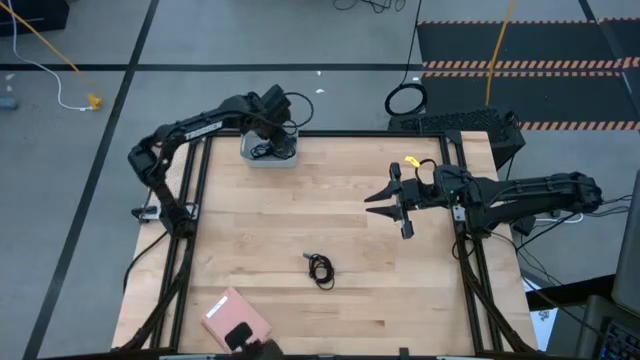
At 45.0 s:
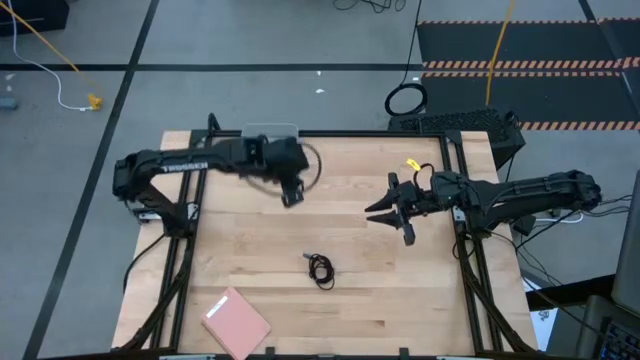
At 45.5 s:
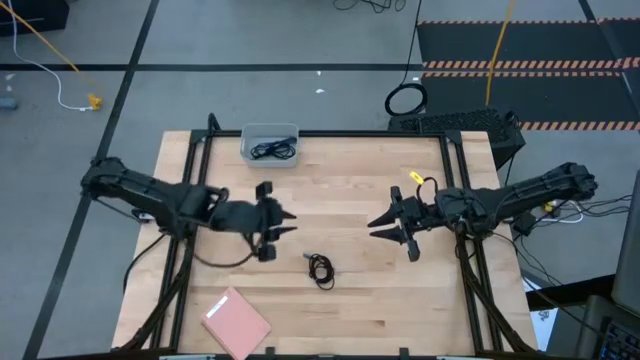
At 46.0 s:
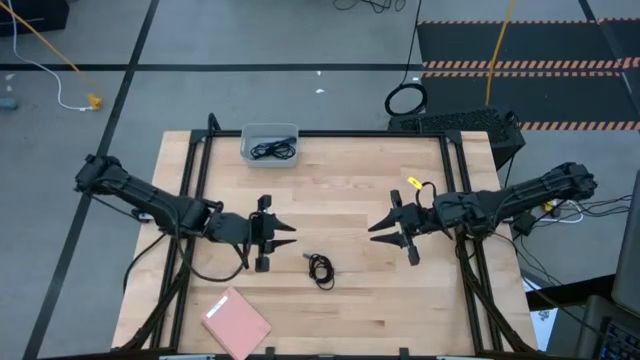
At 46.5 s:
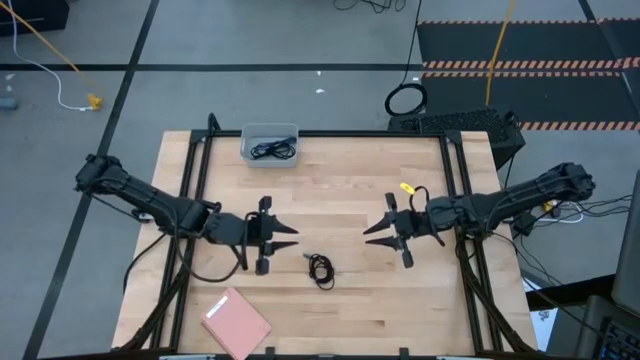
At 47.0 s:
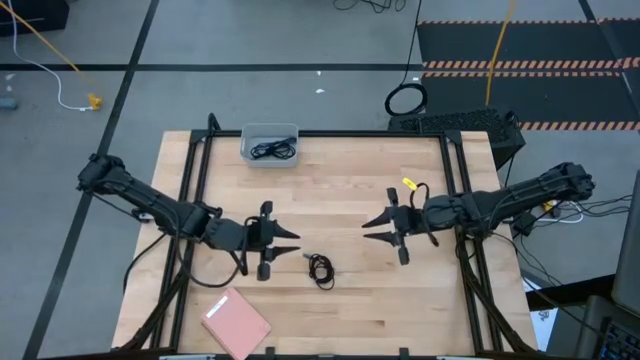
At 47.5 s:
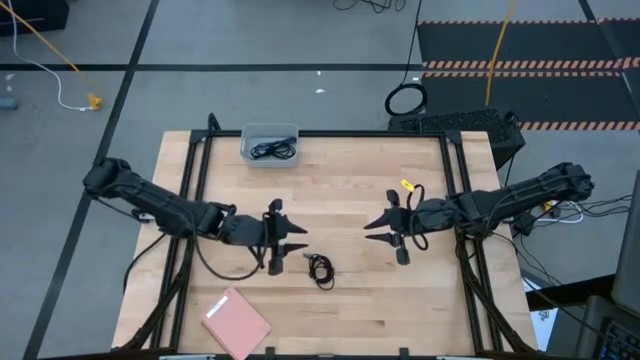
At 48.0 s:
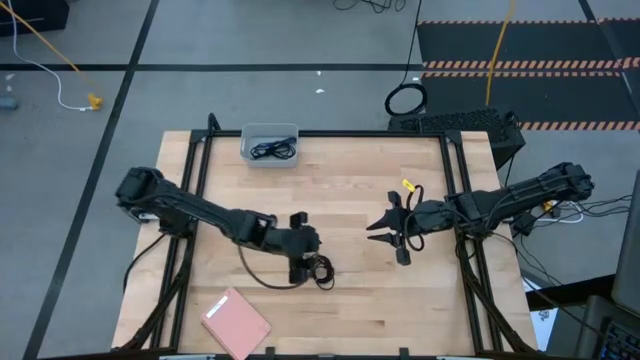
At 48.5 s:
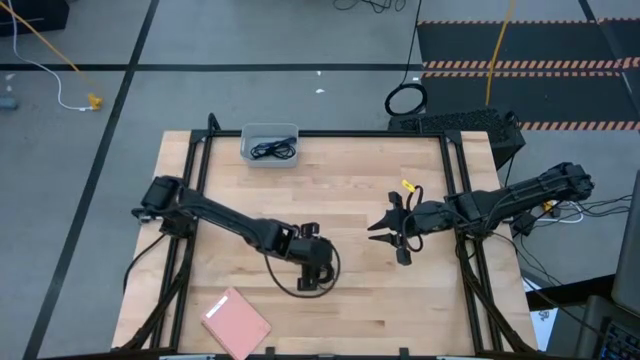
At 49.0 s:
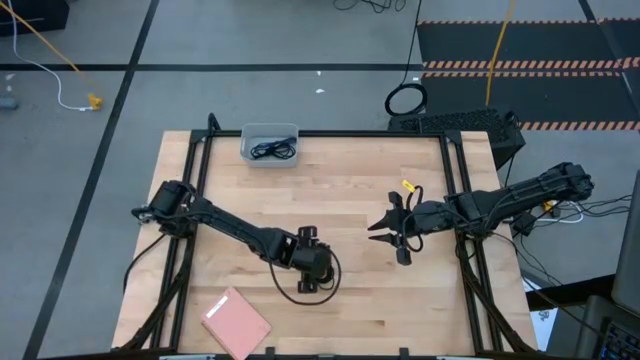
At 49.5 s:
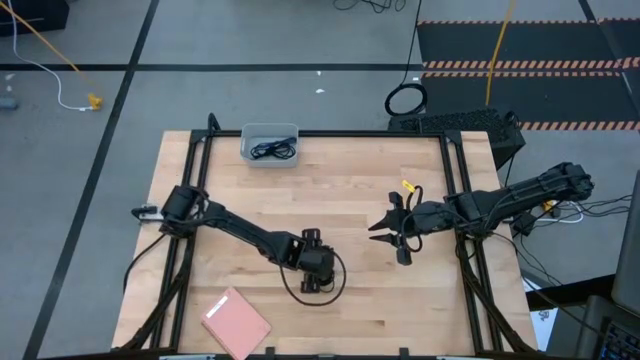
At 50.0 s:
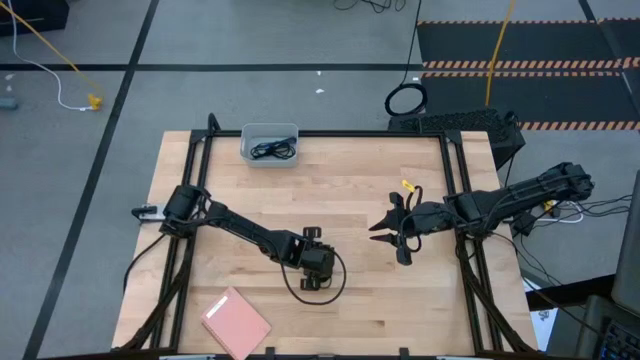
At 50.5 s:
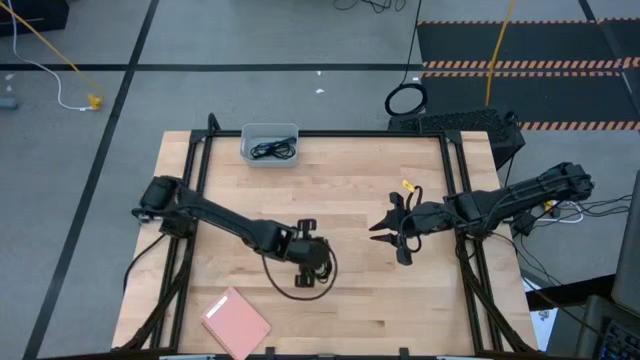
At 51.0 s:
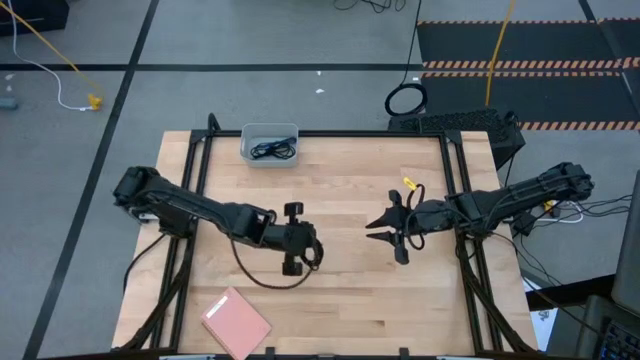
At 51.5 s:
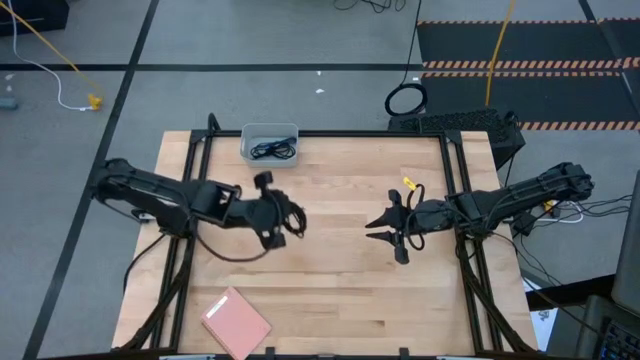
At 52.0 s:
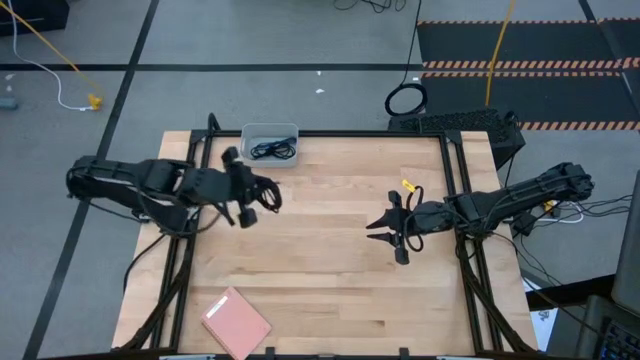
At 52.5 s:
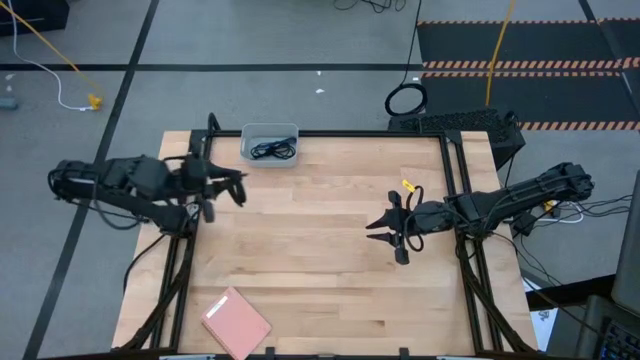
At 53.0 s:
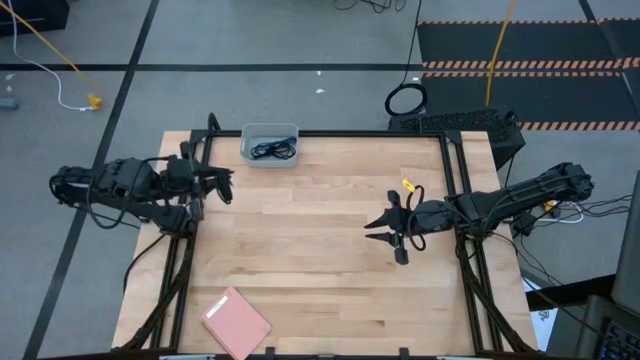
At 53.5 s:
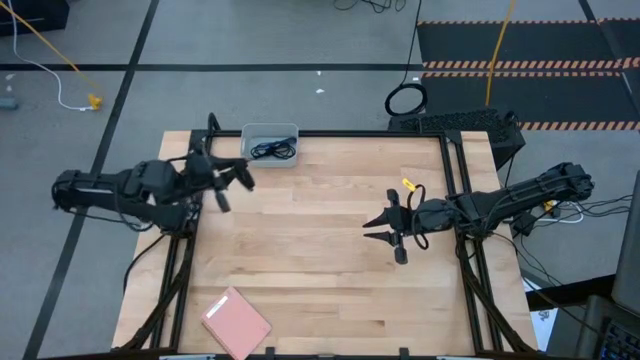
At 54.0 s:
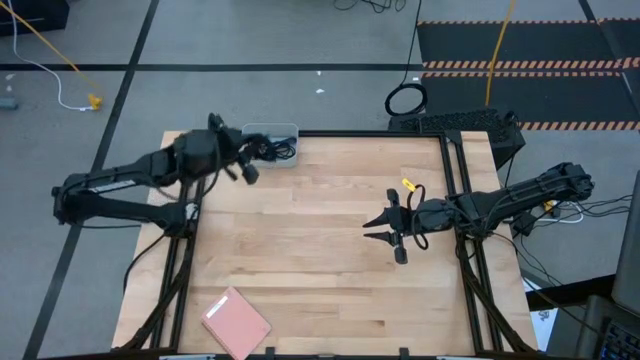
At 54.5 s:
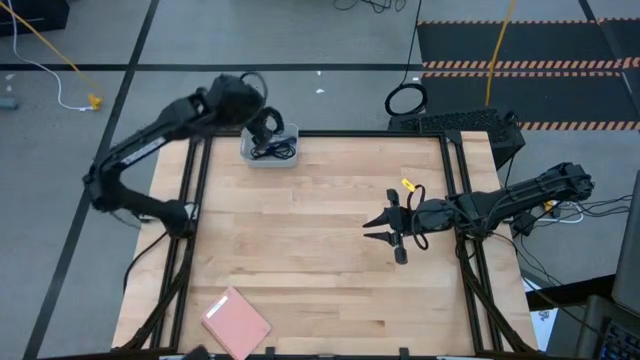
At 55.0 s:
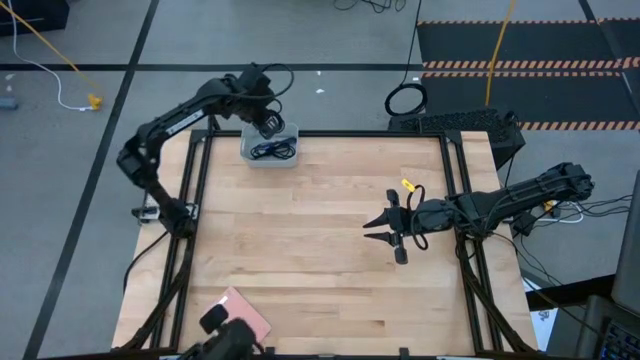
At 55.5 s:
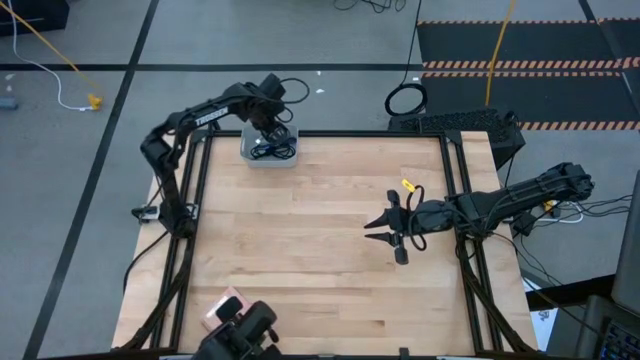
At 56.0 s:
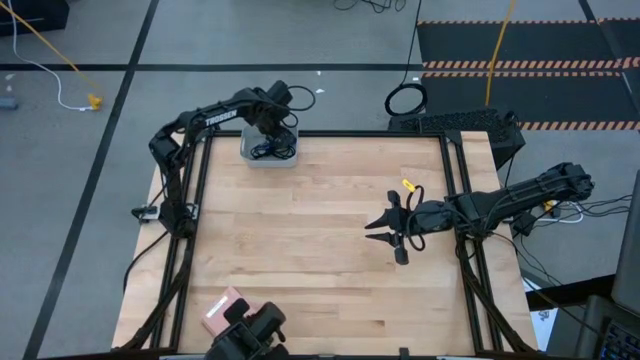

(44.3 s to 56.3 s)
Task: Pick and place USB-C Cables
Put the black charger cable into the white bin
